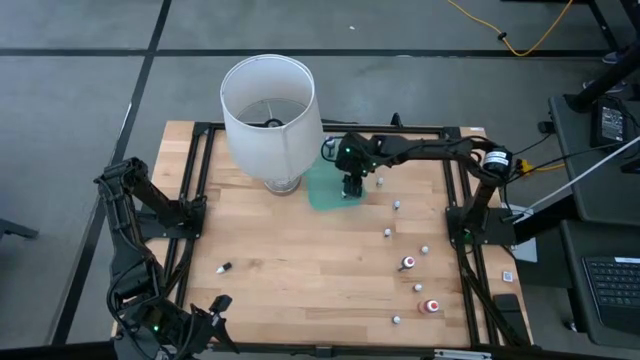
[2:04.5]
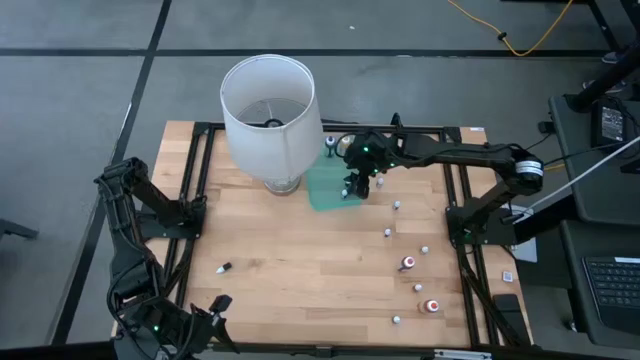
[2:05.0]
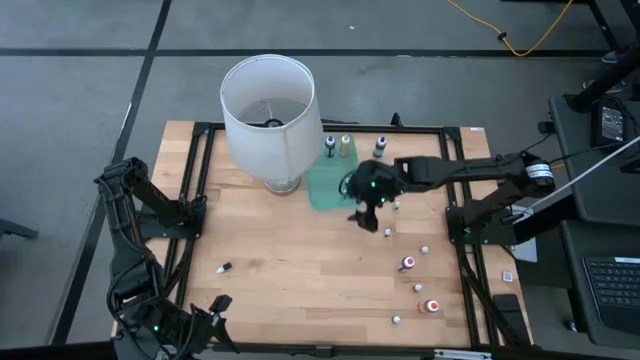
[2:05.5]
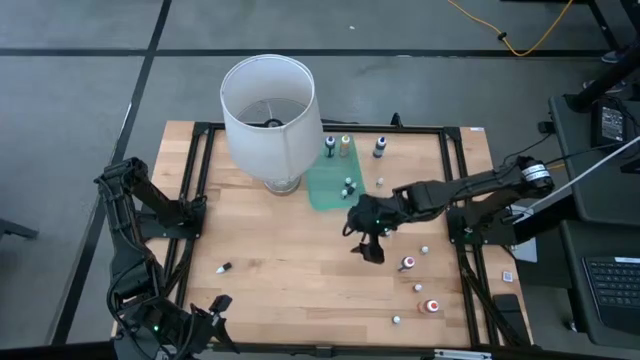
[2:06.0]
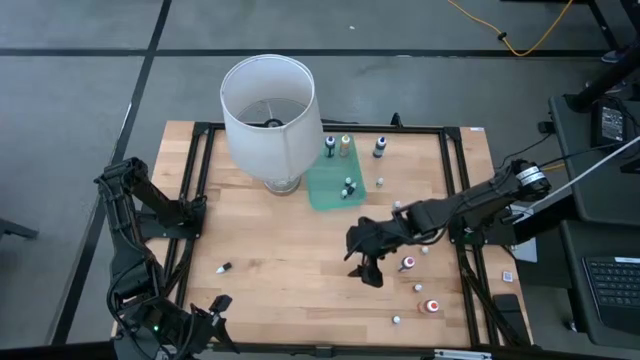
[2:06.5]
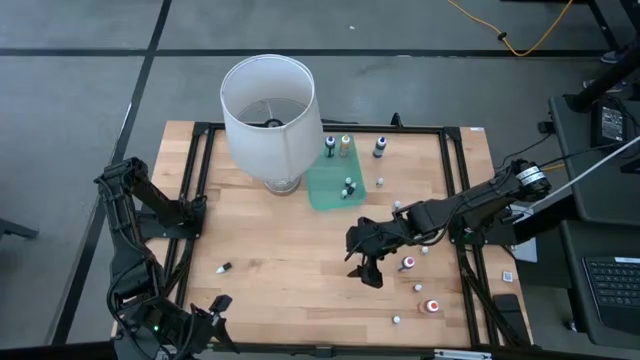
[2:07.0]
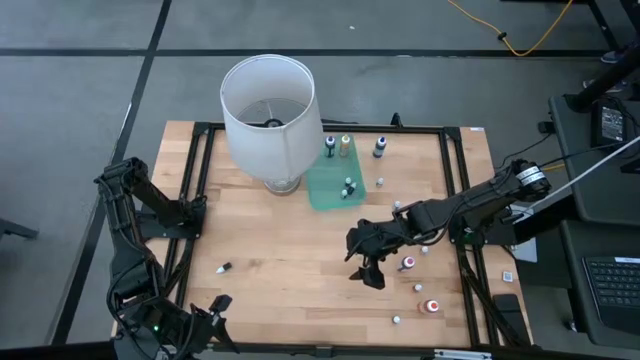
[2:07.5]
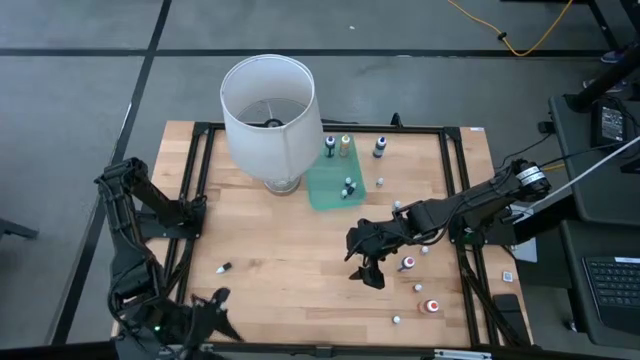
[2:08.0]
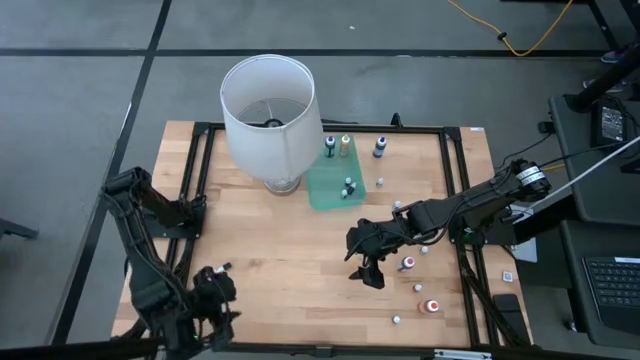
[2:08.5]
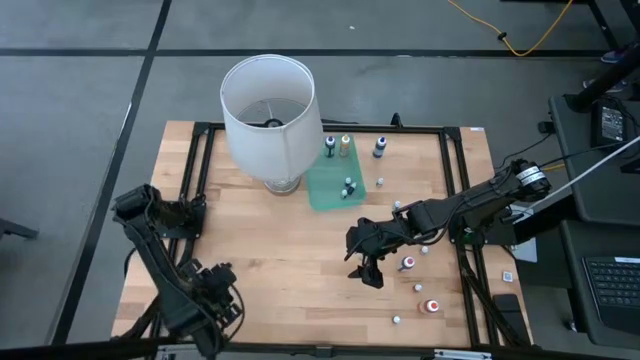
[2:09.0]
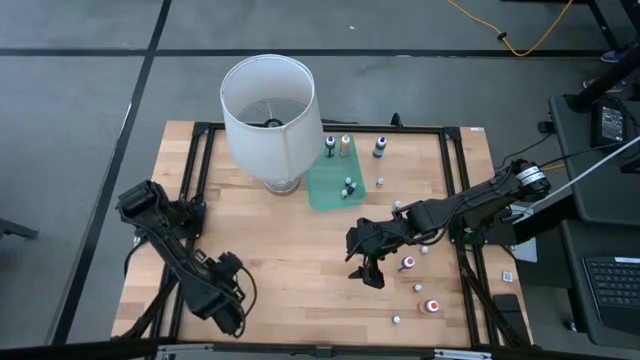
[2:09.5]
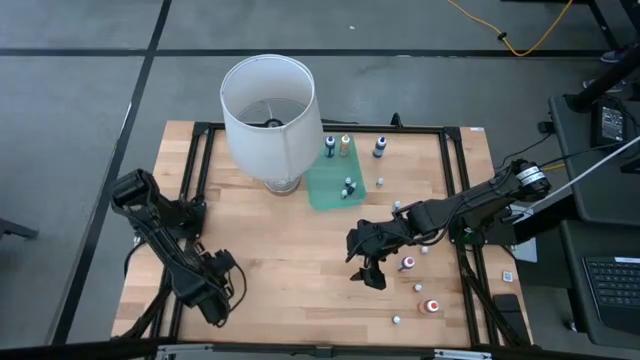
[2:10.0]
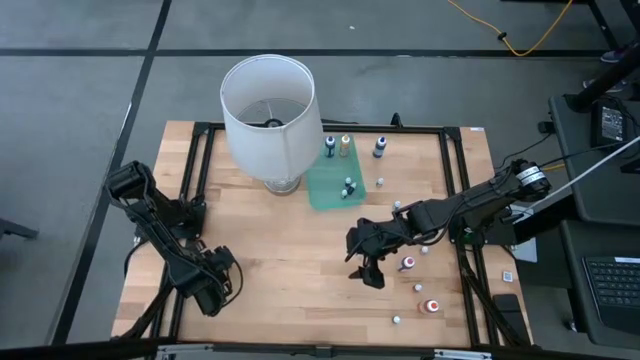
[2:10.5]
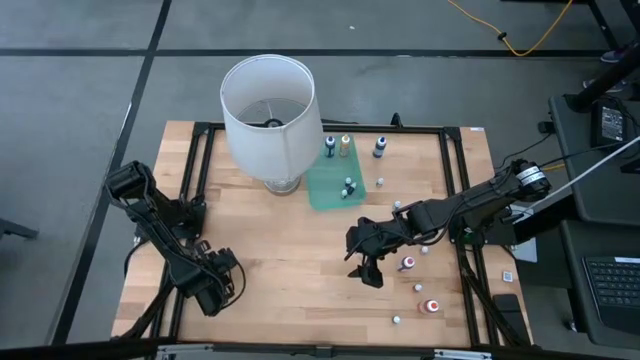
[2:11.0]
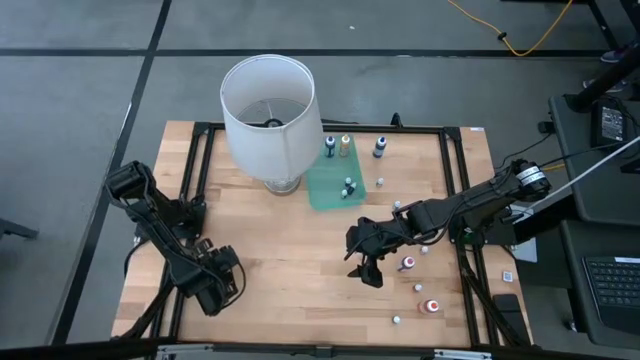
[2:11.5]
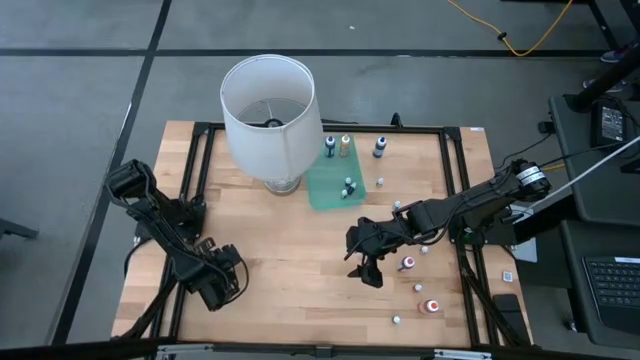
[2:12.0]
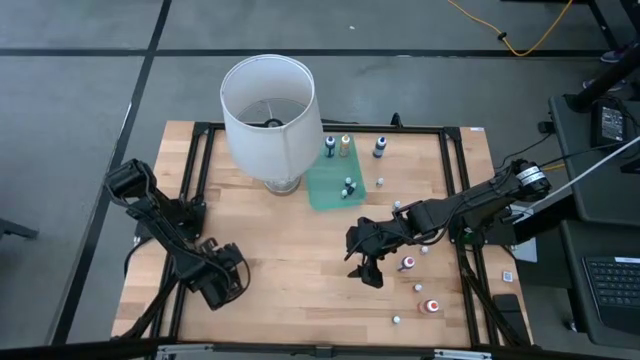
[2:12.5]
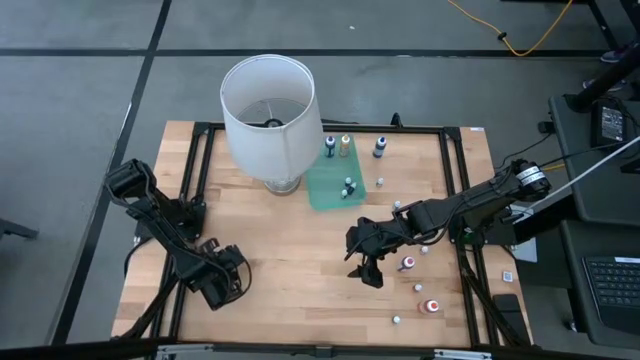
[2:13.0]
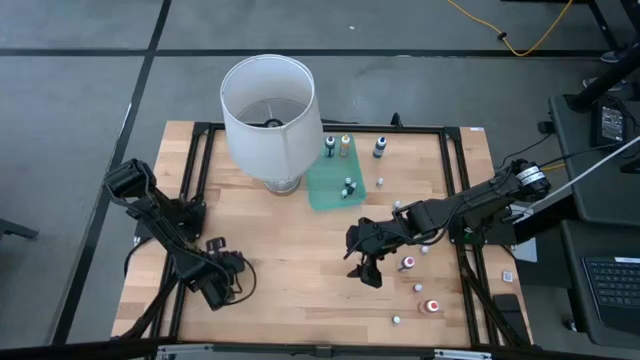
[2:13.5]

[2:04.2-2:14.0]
Task: Pick & Place food coloring
Put the top small green food coloring bottle into the green bin

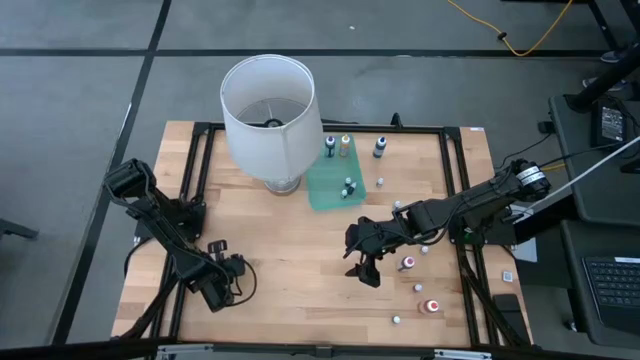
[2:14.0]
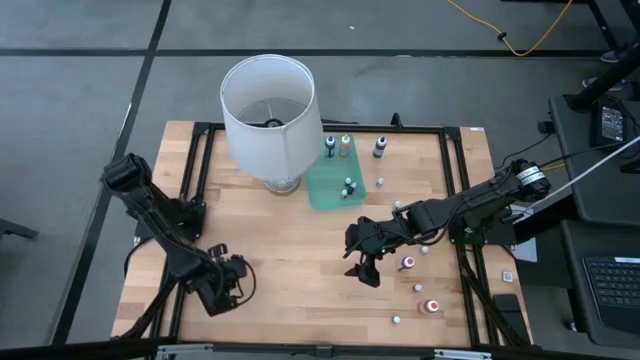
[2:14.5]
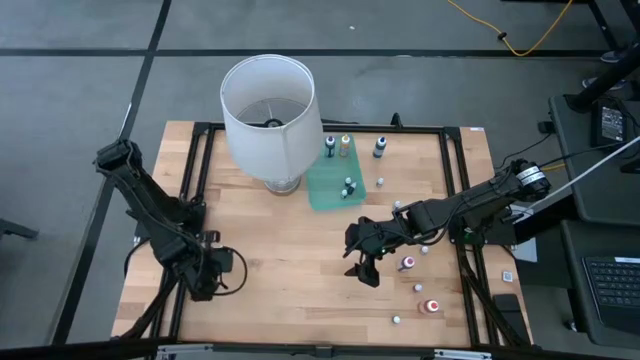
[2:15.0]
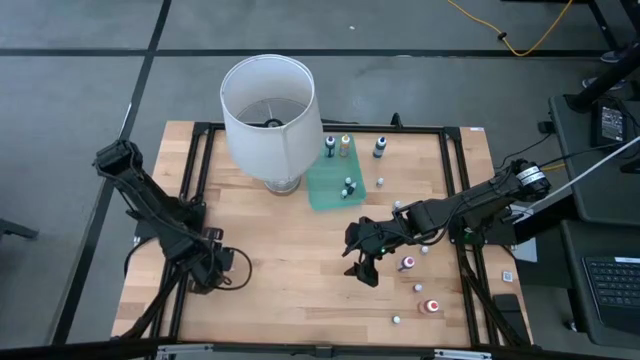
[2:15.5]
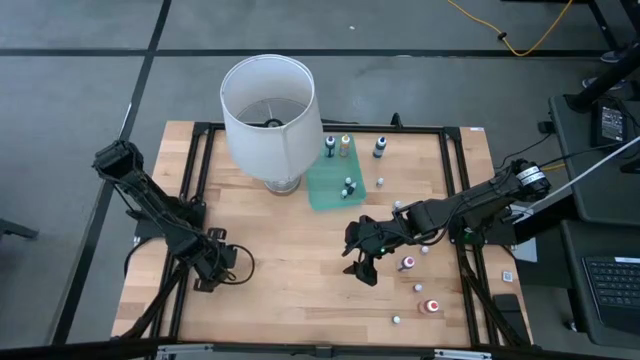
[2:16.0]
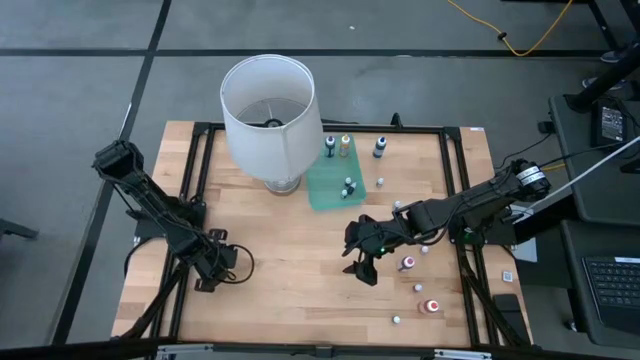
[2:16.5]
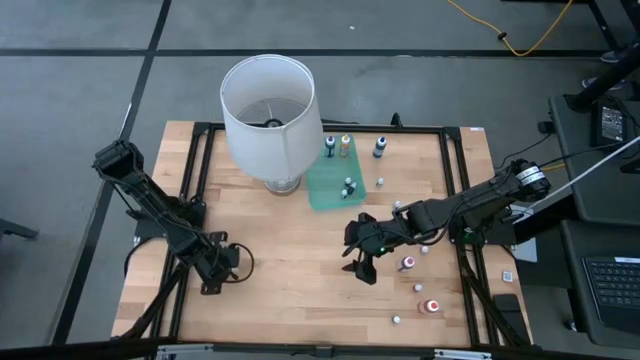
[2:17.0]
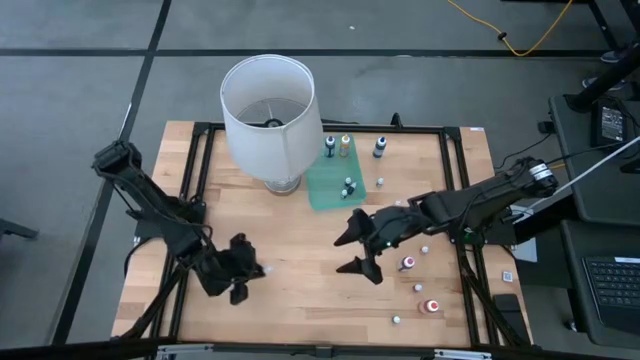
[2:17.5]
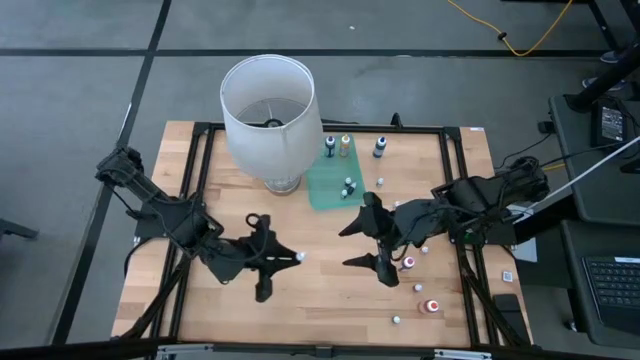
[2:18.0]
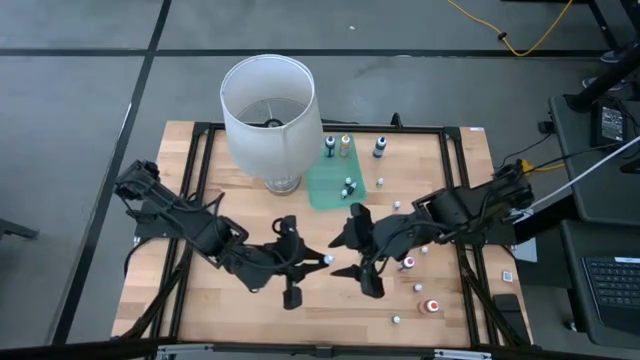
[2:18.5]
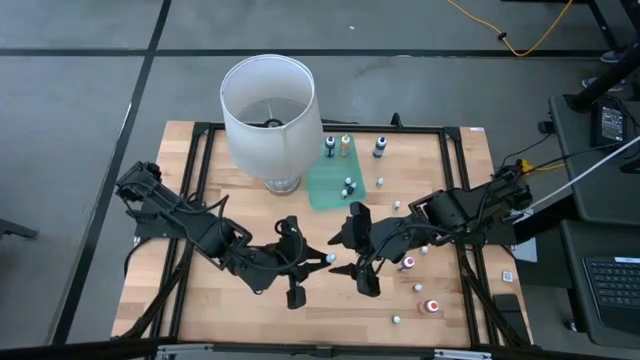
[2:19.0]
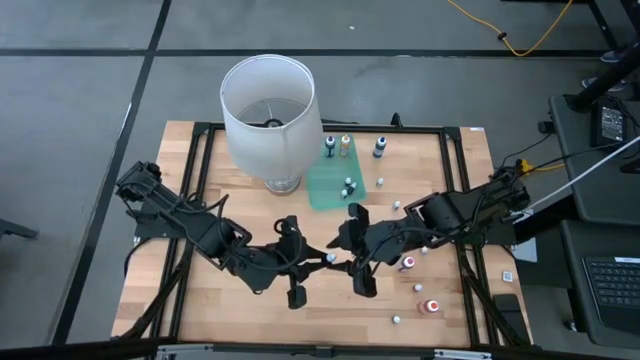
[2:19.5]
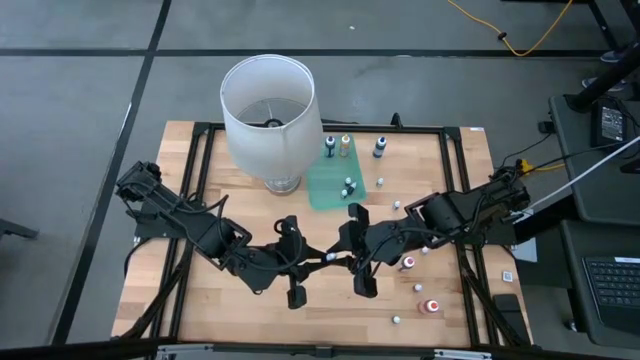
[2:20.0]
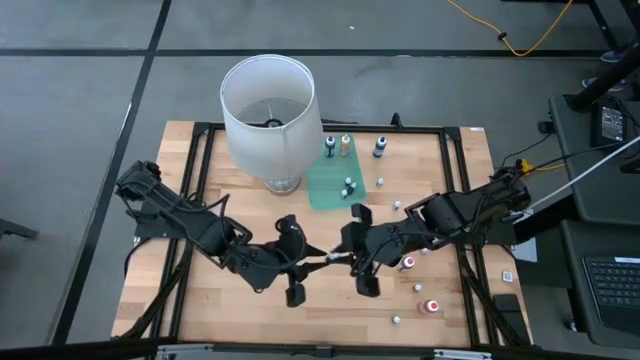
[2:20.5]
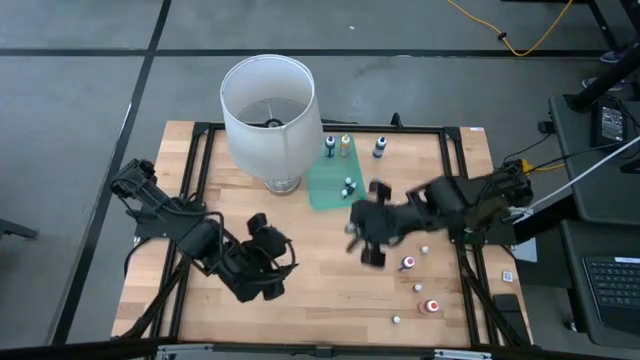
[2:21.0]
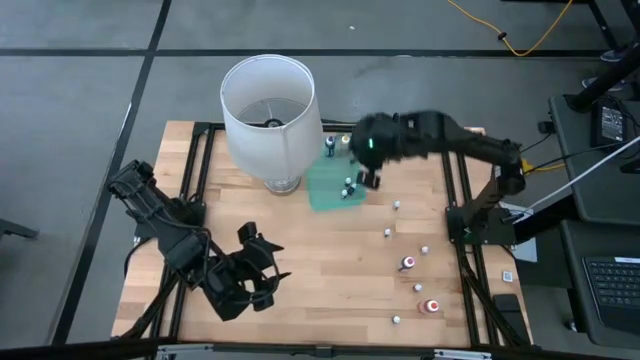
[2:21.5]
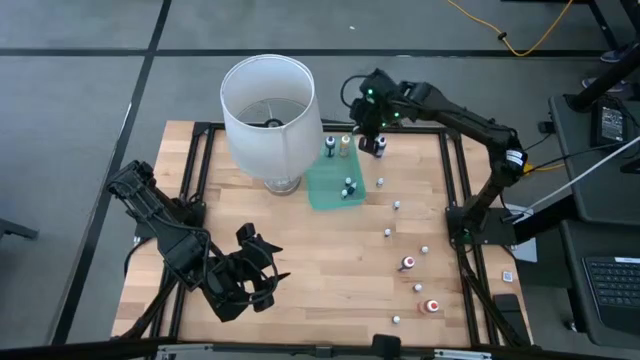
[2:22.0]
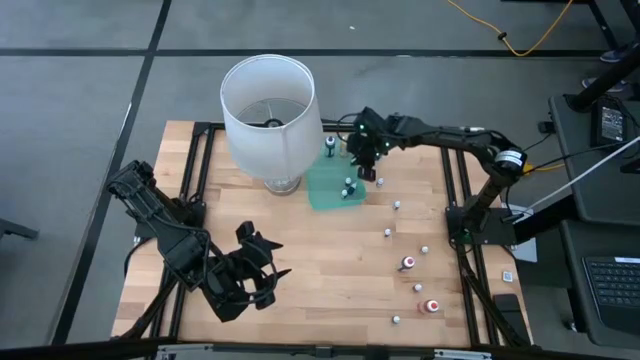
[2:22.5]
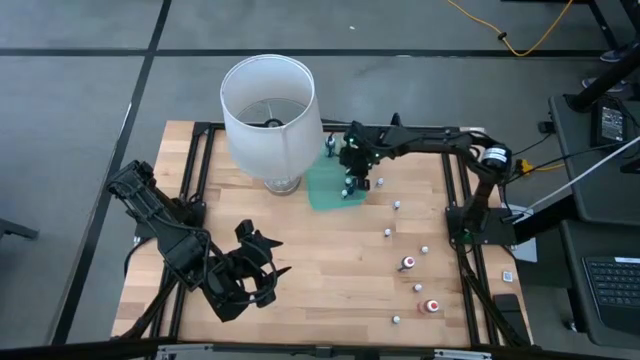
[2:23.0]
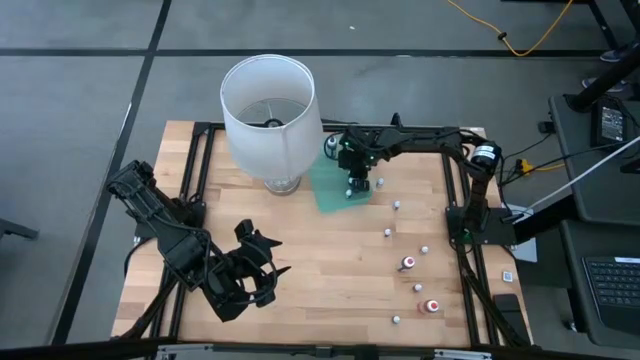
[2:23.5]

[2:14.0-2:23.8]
Put the top small green food coloring bottle into the green bin

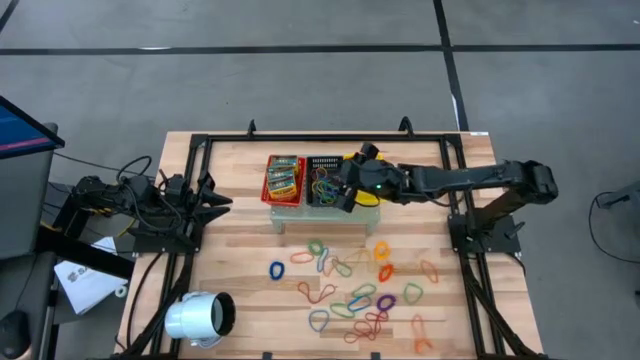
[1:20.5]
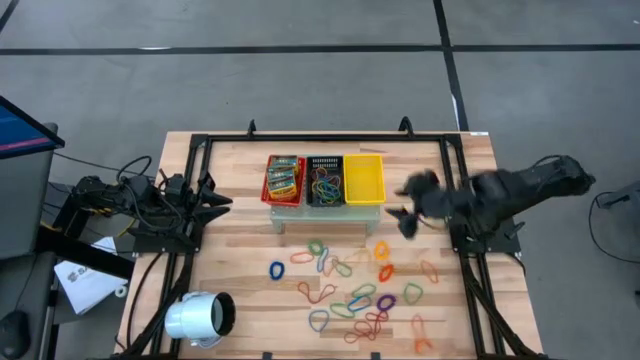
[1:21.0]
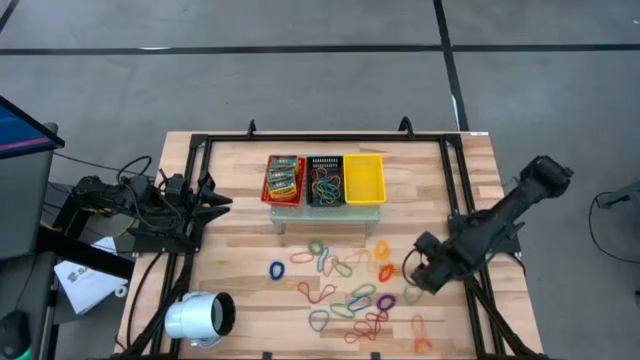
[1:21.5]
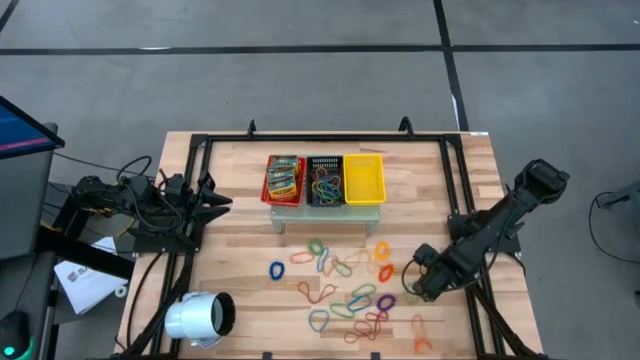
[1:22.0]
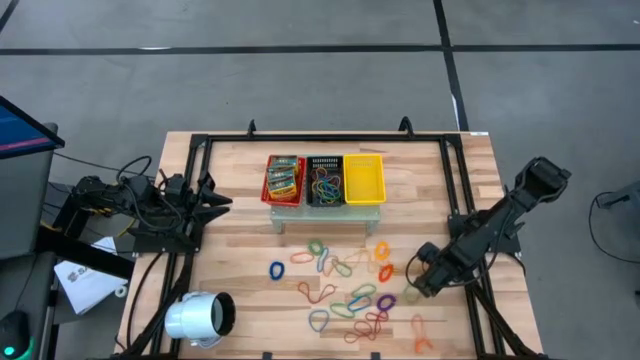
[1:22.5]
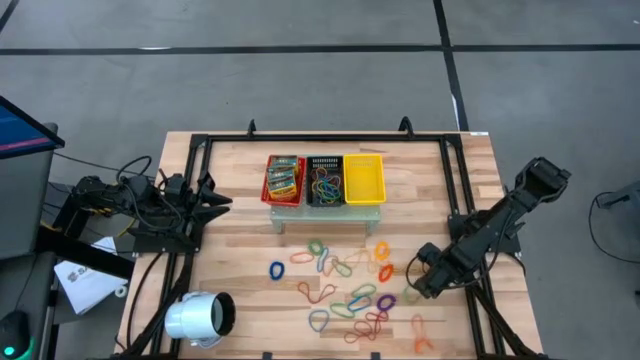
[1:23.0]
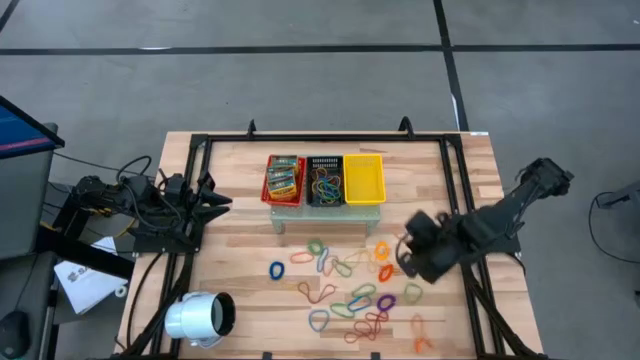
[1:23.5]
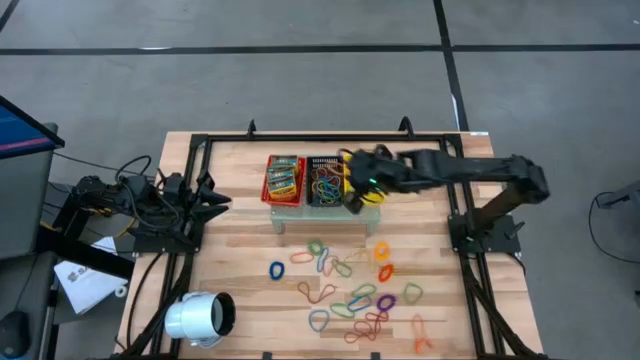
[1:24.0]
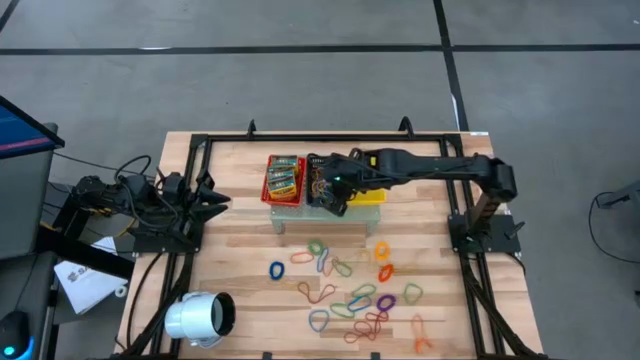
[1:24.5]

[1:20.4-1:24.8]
Task: Pick & Place Office Desk Supplies
Put the orange rubber band into the black bin on the shelf
